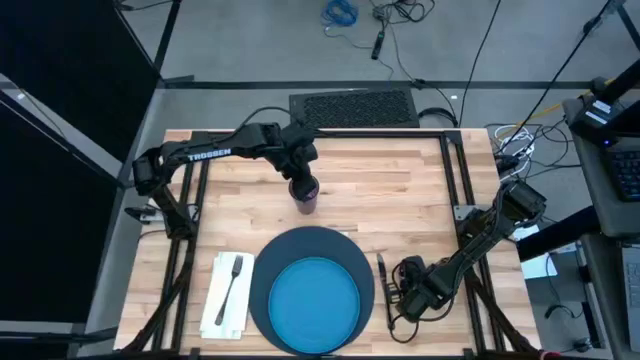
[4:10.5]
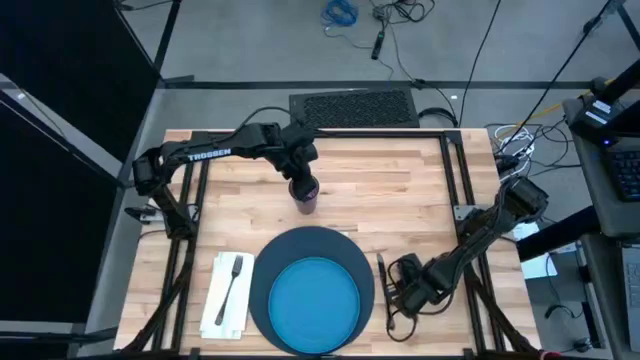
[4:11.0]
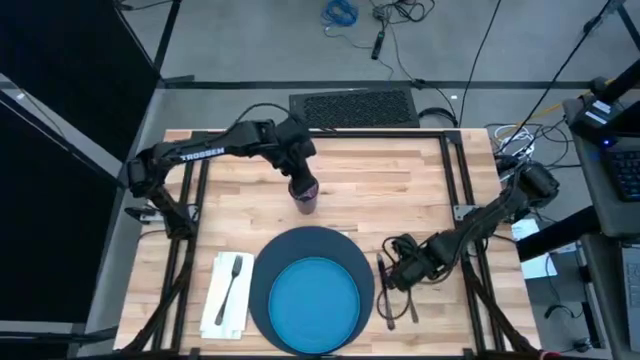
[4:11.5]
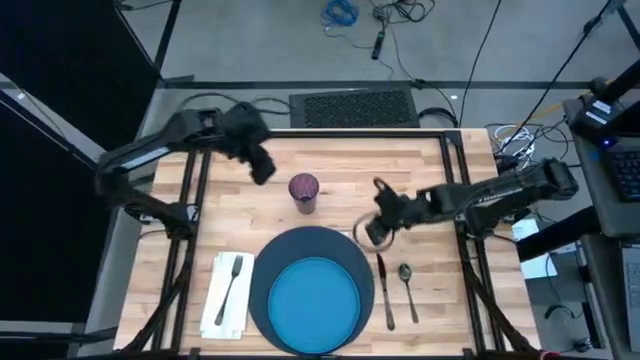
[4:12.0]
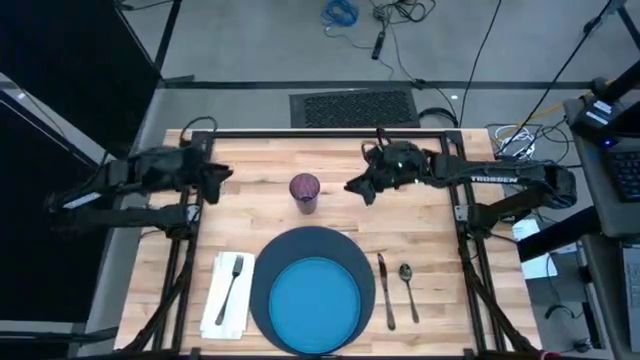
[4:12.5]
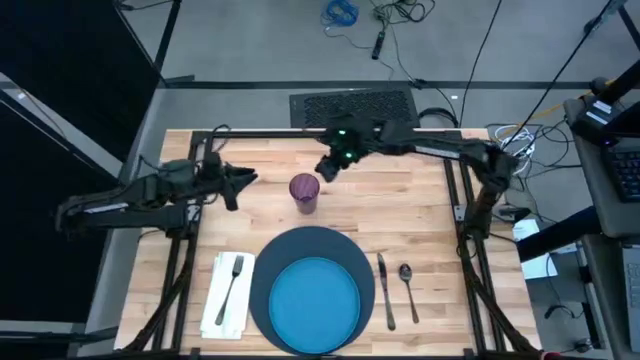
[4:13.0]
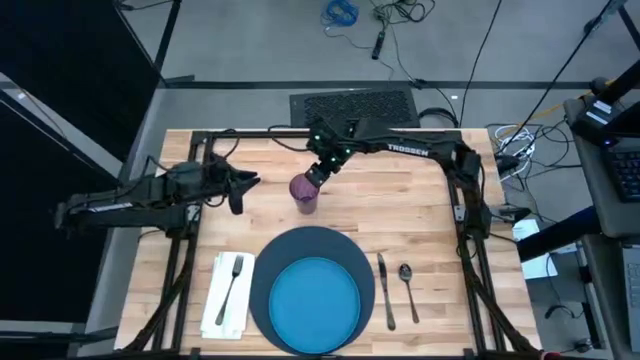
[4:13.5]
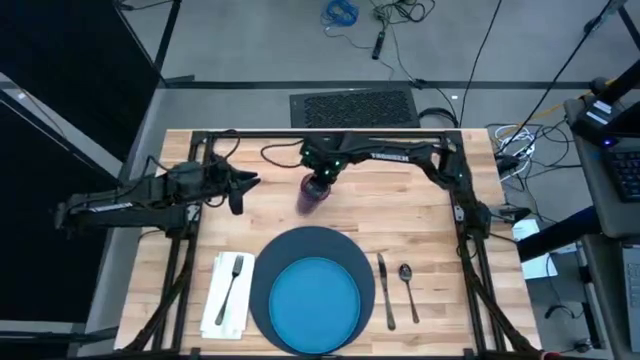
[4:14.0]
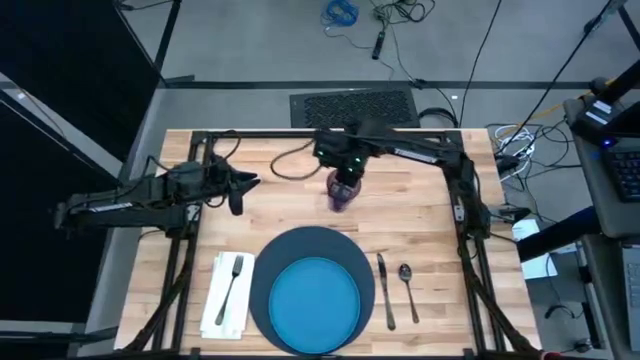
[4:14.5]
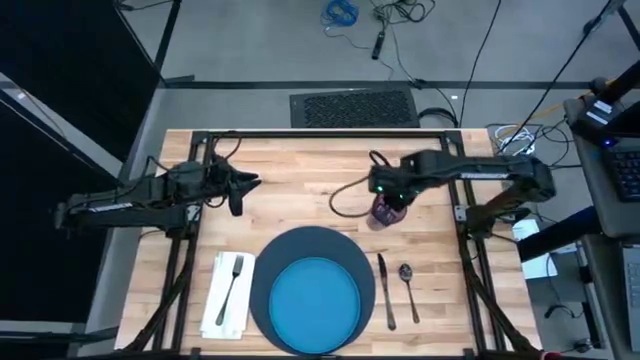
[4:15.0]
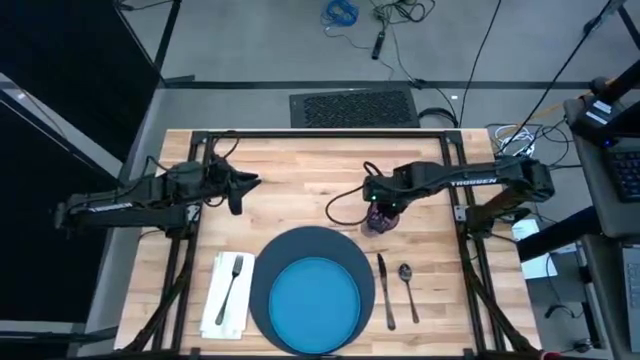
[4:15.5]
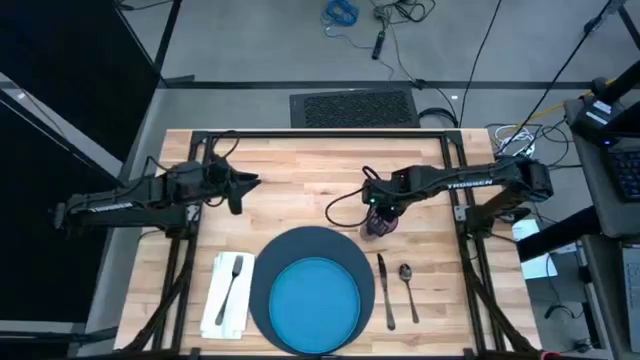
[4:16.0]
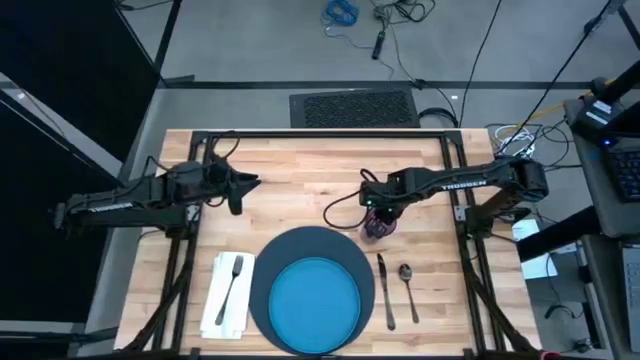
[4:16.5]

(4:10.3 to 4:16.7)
Task: Set table place
Put the violet cup on top of the knife

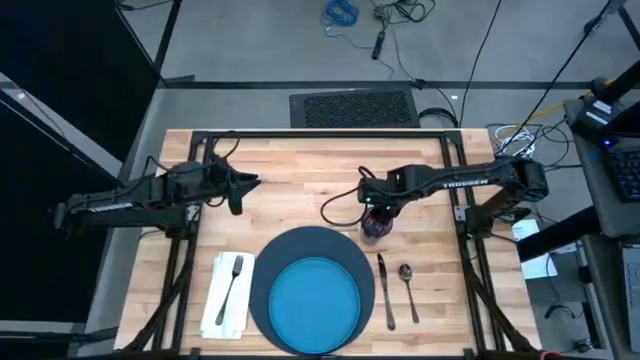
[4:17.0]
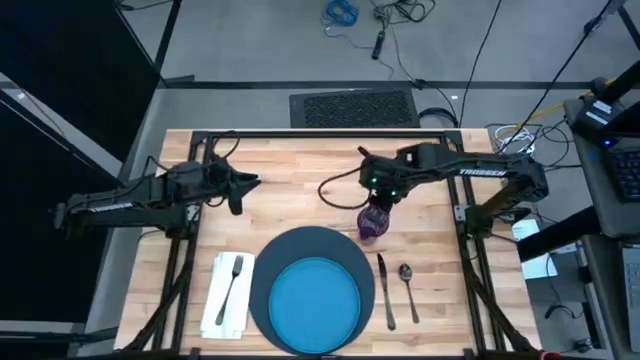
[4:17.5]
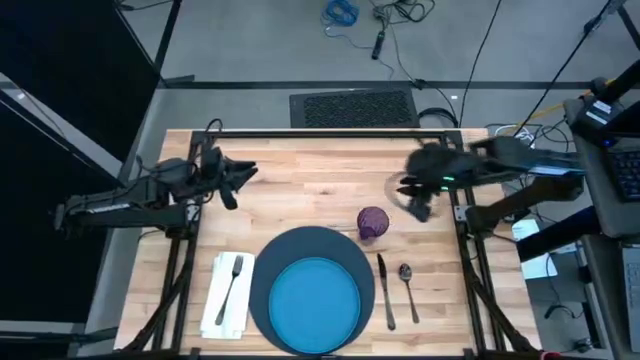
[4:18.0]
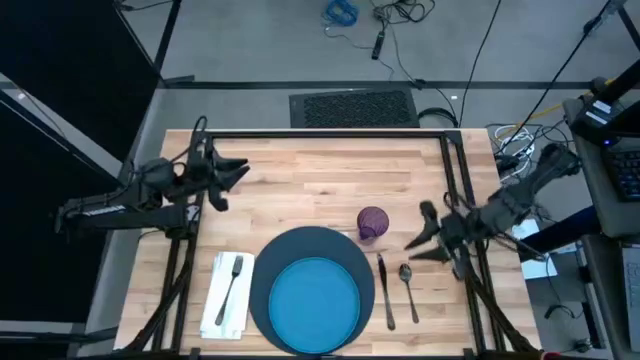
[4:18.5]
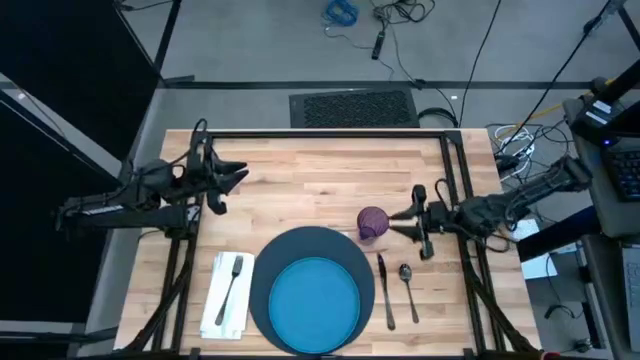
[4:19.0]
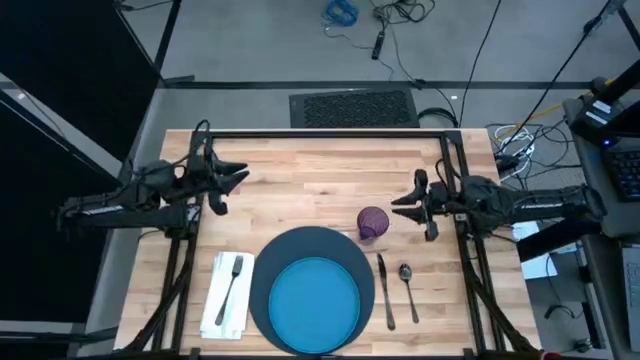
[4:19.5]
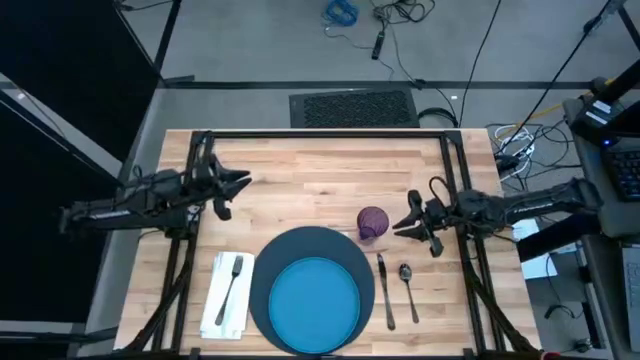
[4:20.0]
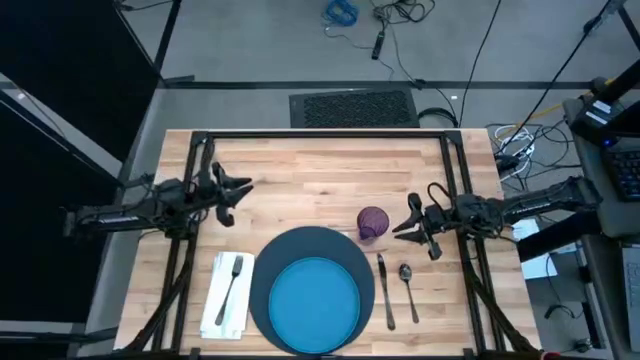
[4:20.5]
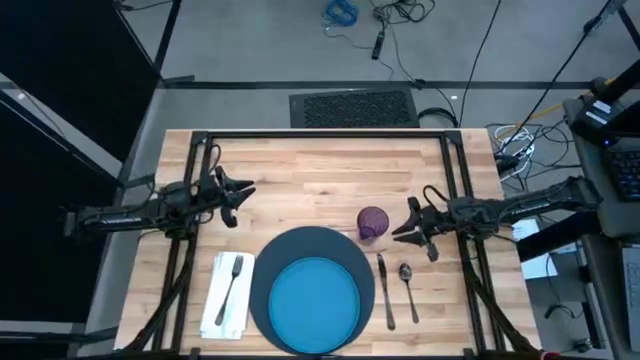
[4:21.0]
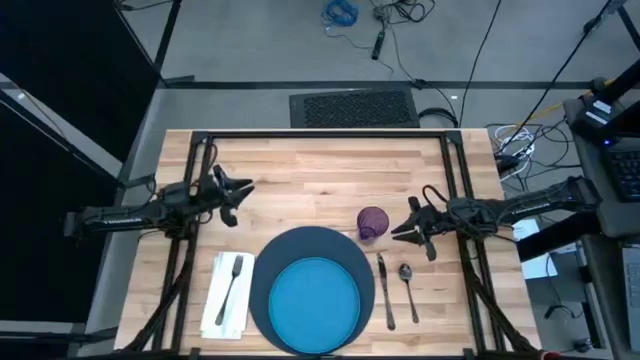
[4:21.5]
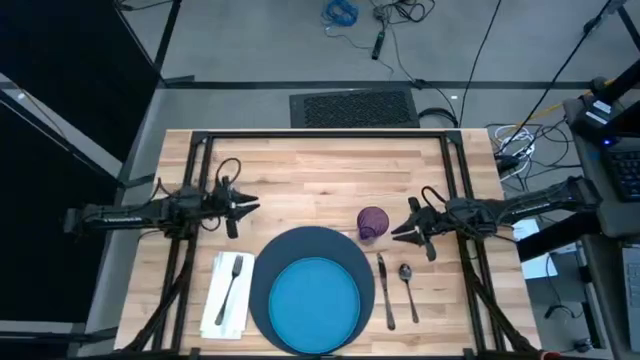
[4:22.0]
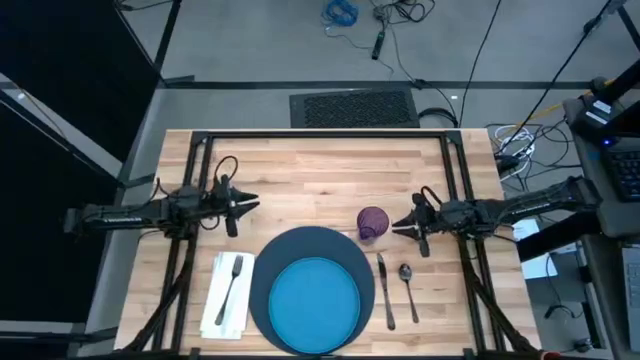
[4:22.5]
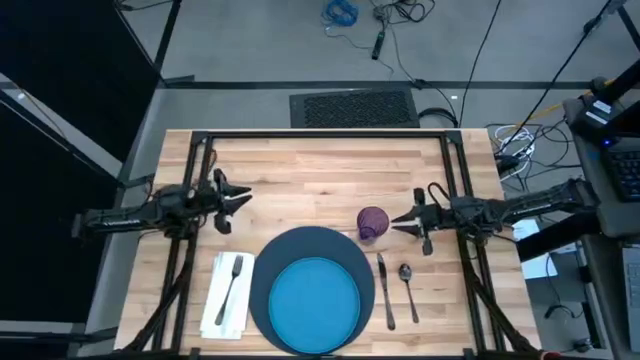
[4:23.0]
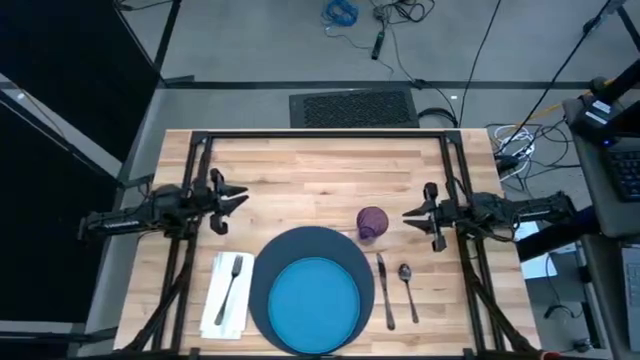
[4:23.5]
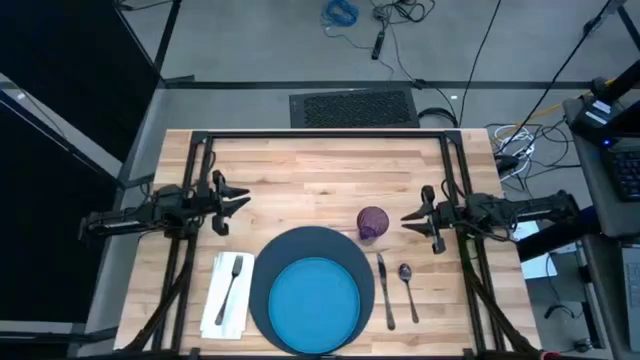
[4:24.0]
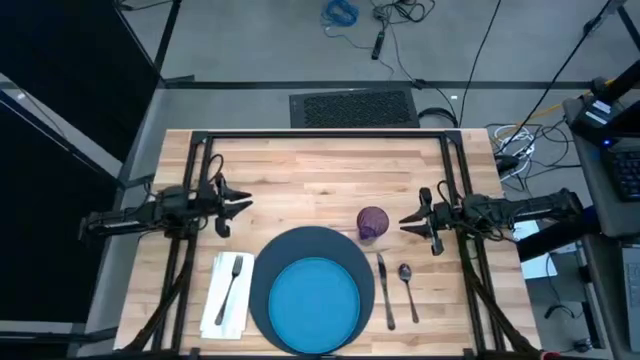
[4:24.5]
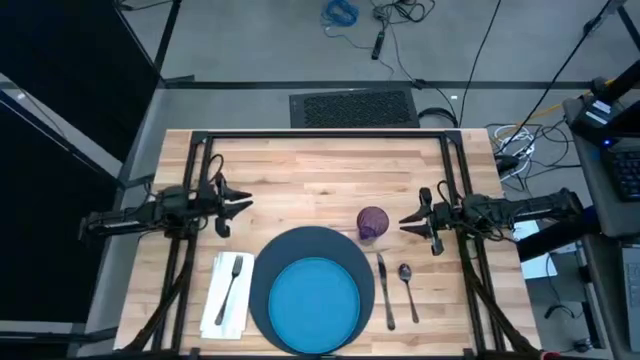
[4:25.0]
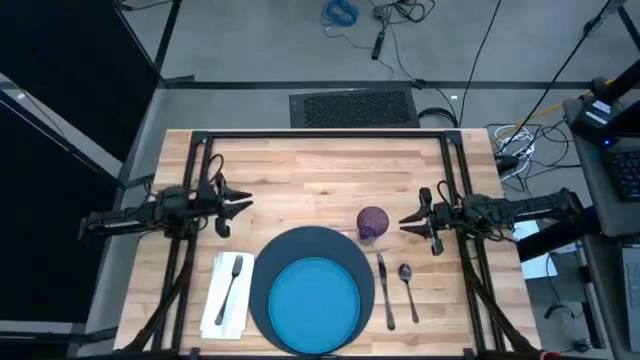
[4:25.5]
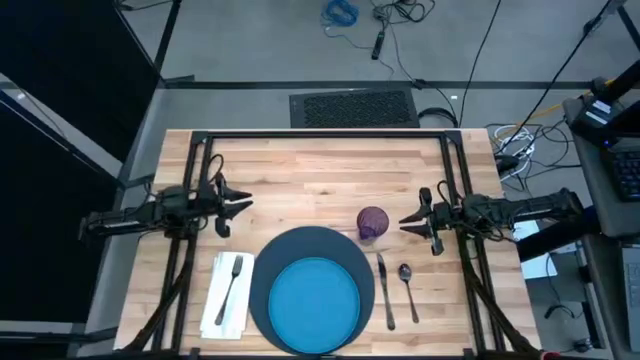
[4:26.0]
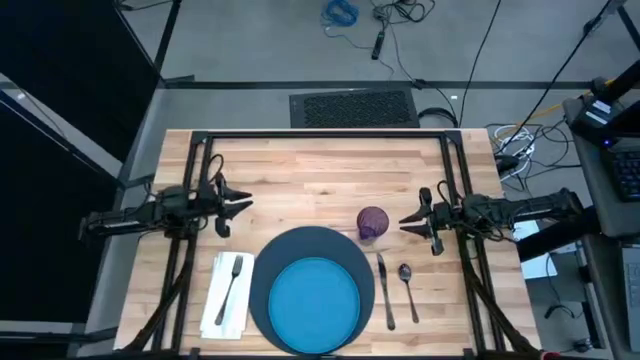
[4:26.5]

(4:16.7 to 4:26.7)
Return to Home Position

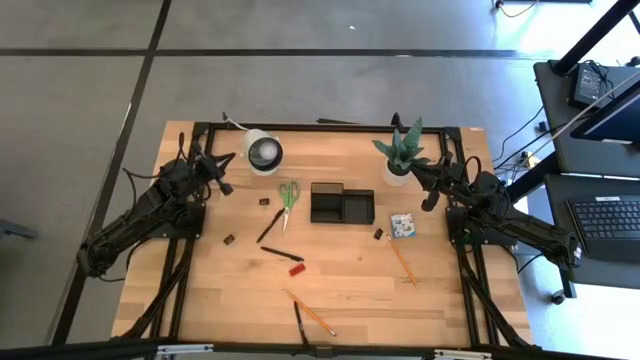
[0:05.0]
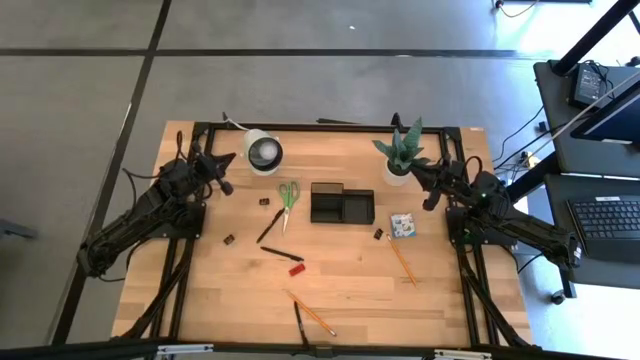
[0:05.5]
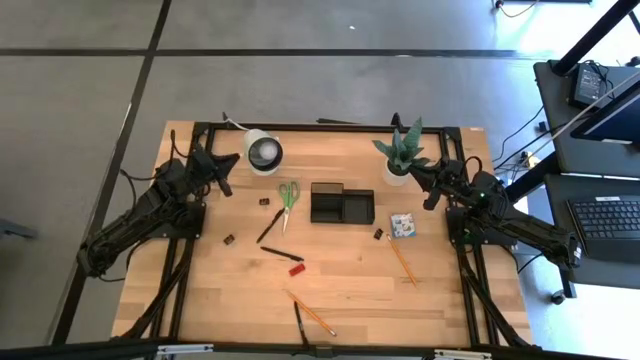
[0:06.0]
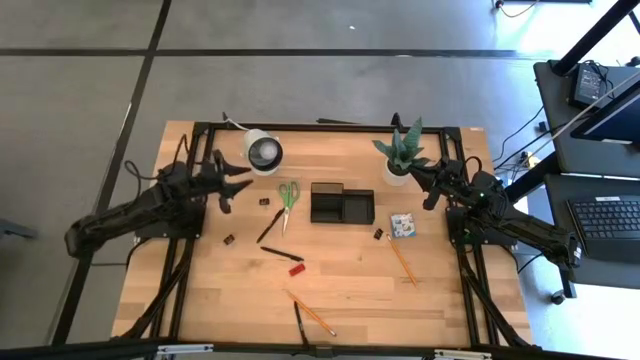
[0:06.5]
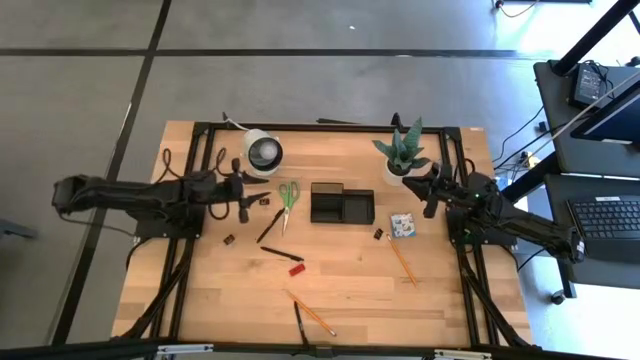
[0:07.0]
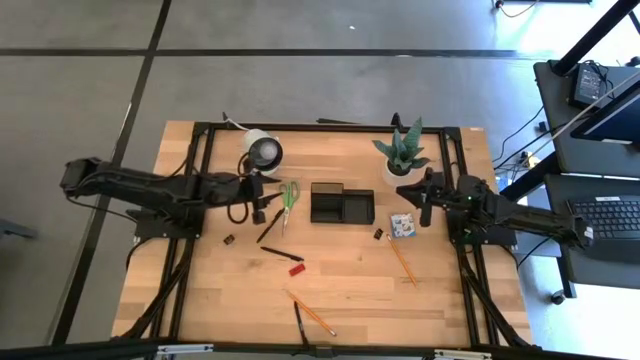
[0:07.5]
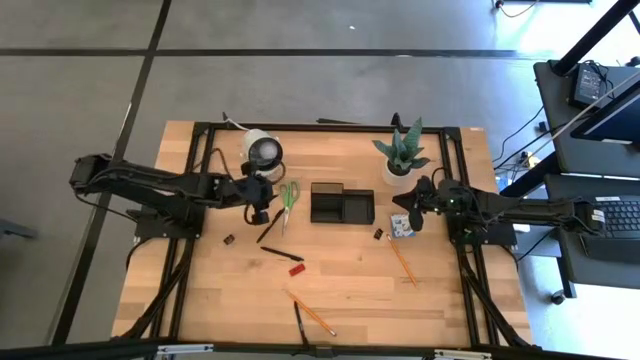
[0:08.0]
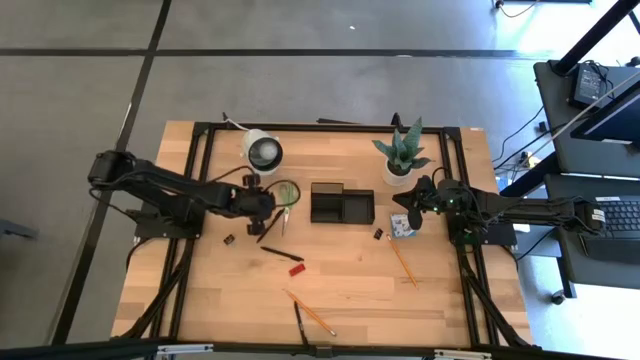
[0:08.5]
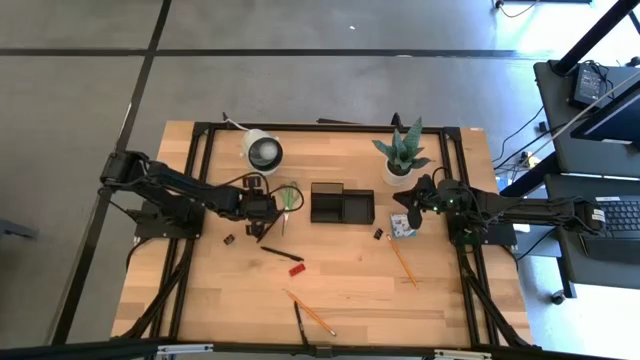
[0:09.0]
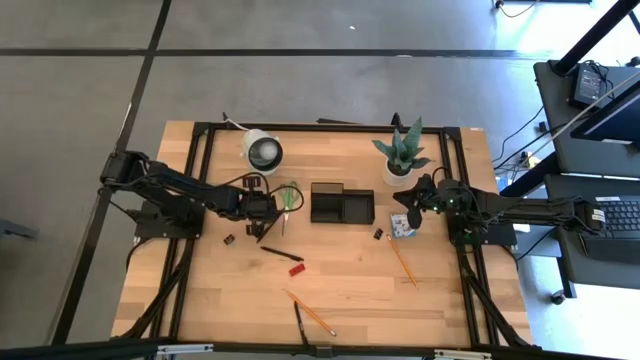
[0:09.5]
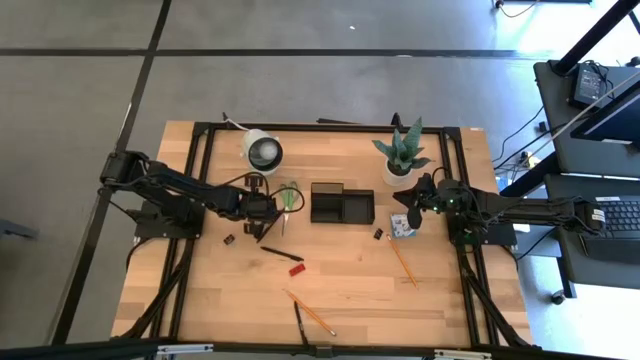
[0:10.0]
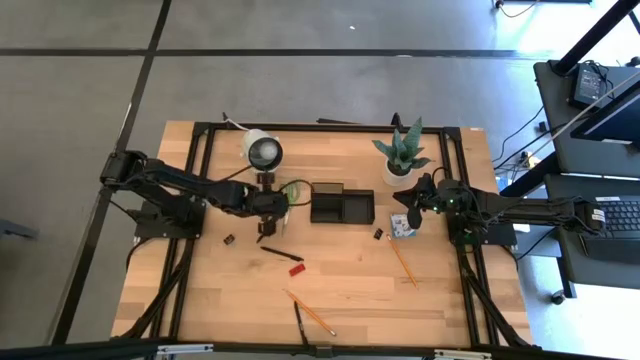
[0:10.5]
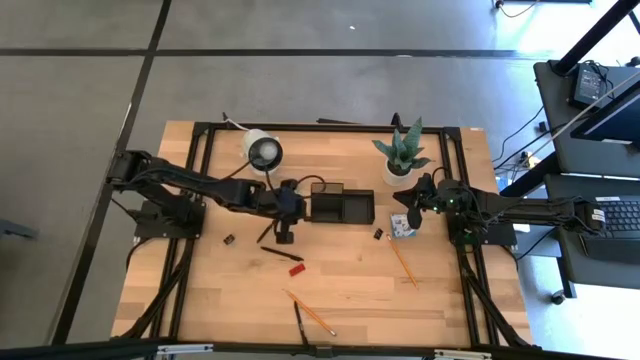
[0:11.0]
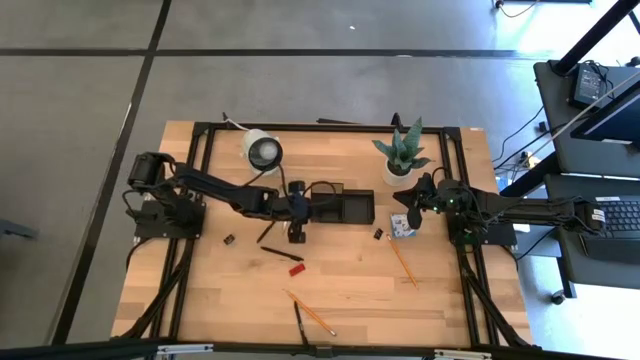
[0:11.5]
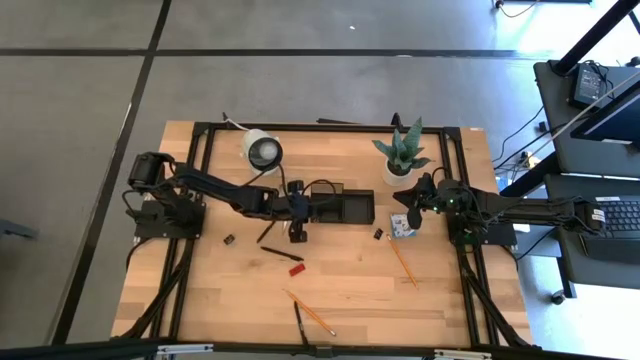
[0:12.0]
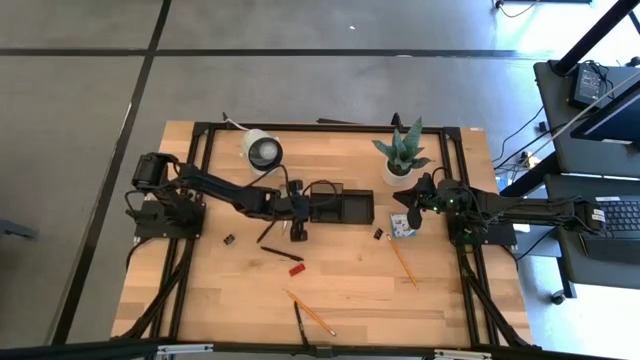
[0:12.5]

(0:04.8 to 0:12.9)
Task: Pick and place office supplies into organizer
Put the top black binder clip in the desk organizer
